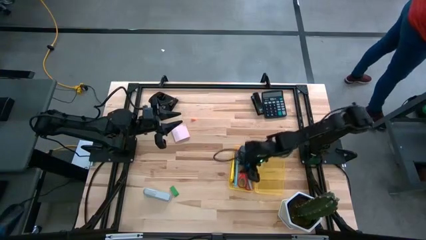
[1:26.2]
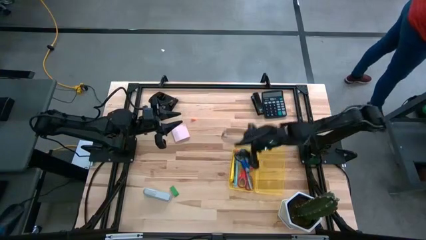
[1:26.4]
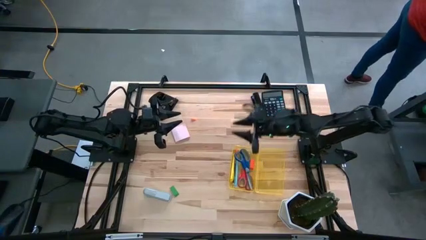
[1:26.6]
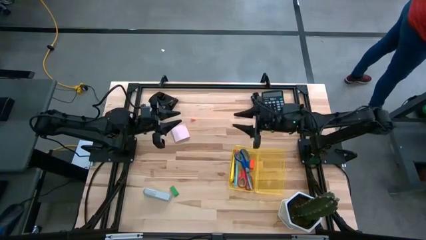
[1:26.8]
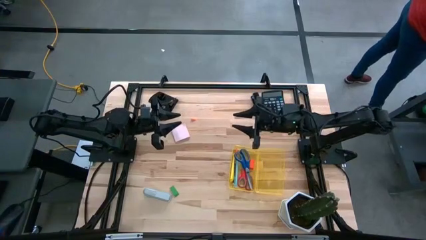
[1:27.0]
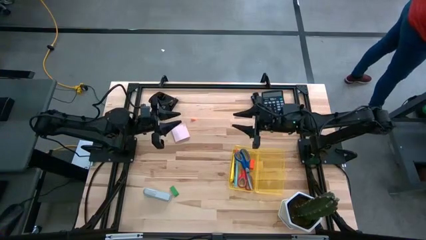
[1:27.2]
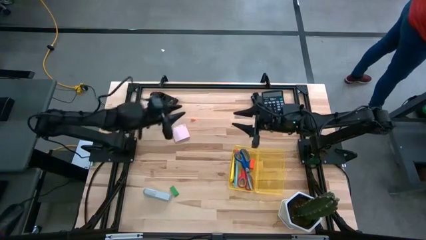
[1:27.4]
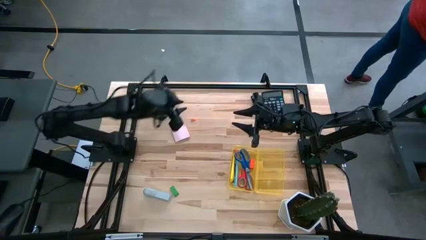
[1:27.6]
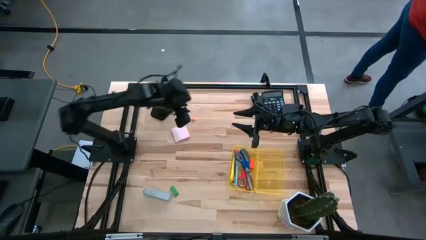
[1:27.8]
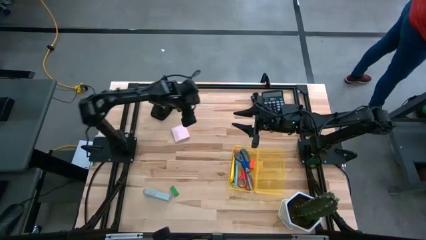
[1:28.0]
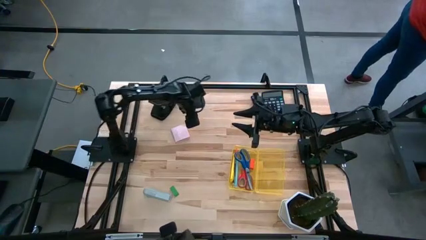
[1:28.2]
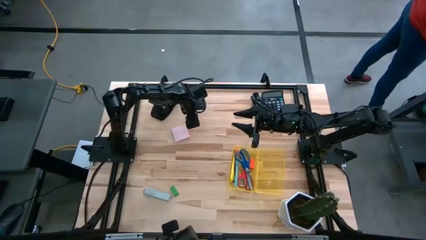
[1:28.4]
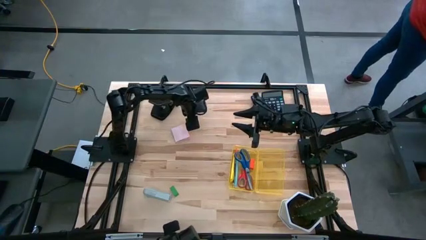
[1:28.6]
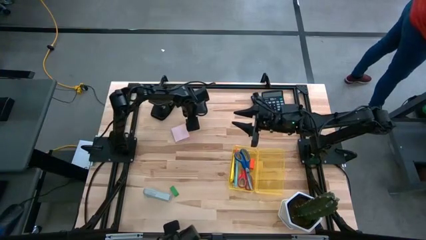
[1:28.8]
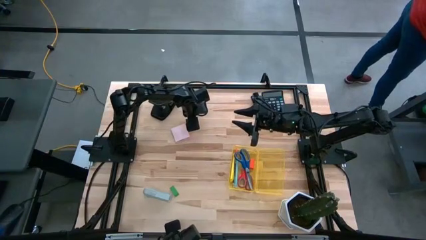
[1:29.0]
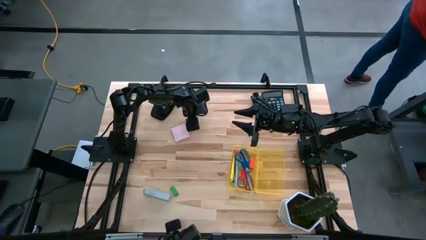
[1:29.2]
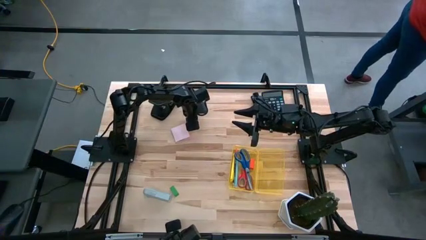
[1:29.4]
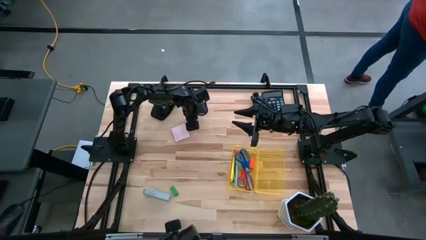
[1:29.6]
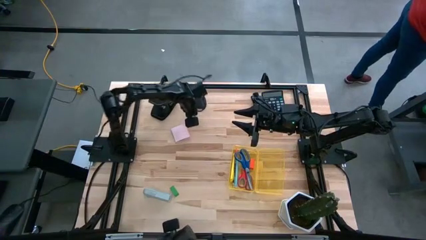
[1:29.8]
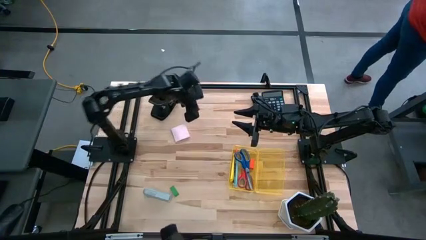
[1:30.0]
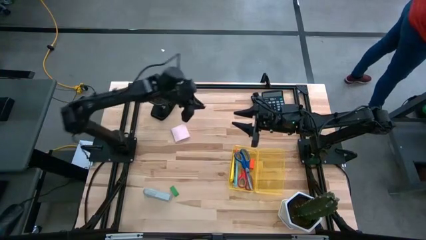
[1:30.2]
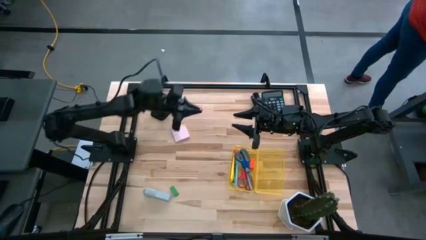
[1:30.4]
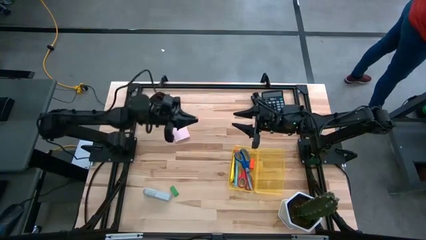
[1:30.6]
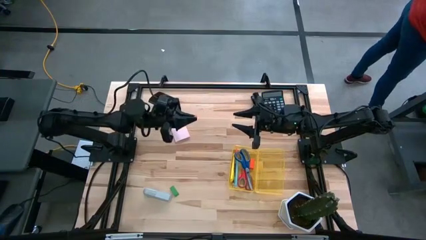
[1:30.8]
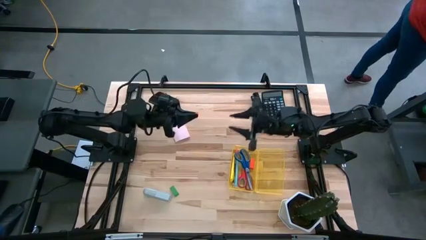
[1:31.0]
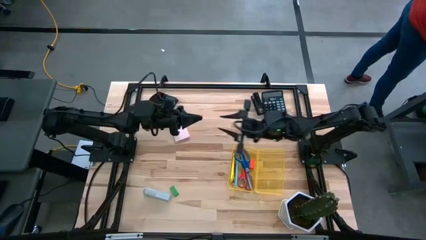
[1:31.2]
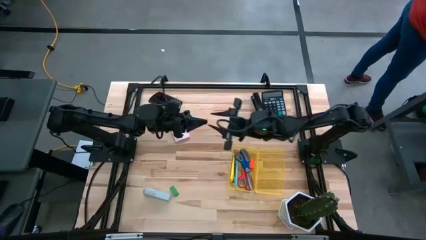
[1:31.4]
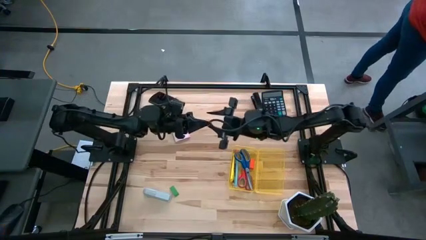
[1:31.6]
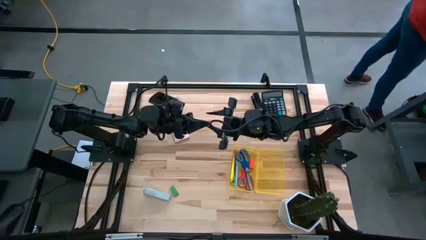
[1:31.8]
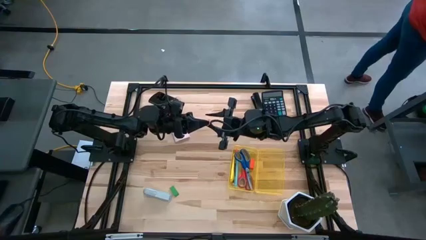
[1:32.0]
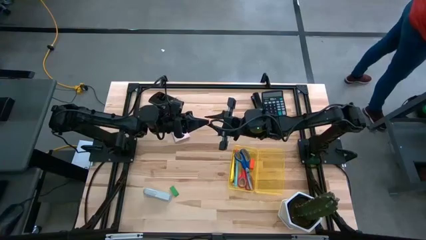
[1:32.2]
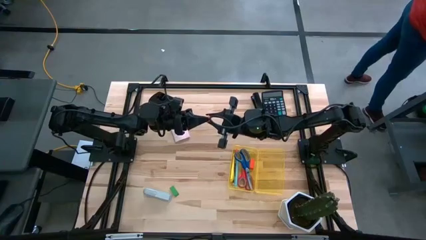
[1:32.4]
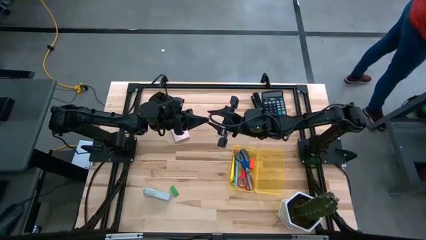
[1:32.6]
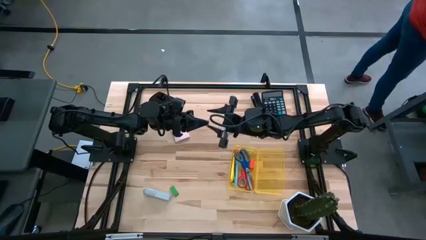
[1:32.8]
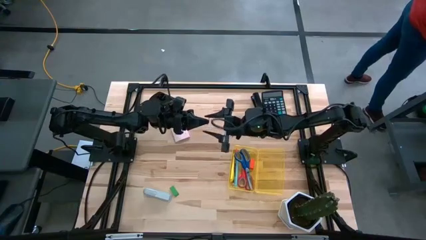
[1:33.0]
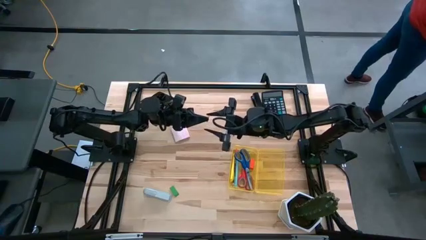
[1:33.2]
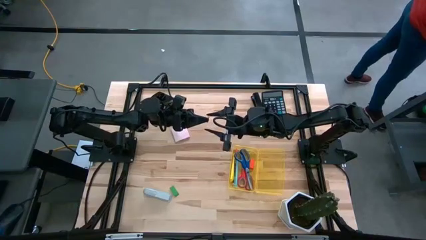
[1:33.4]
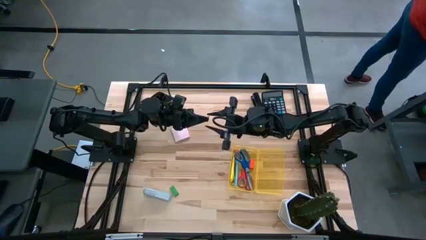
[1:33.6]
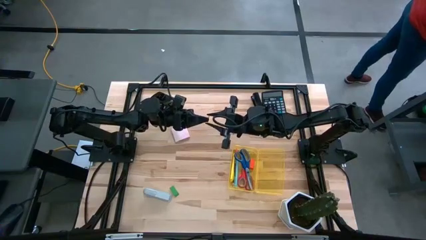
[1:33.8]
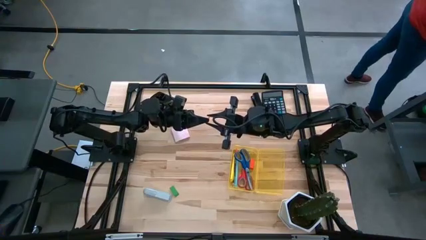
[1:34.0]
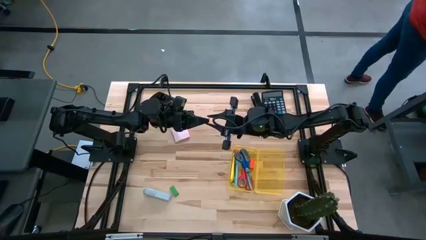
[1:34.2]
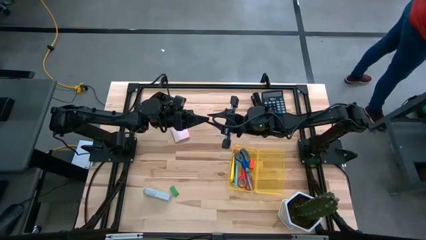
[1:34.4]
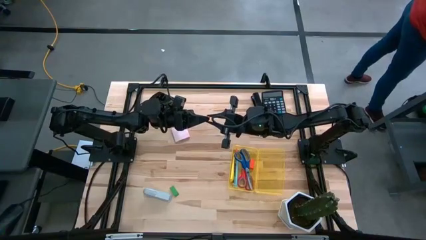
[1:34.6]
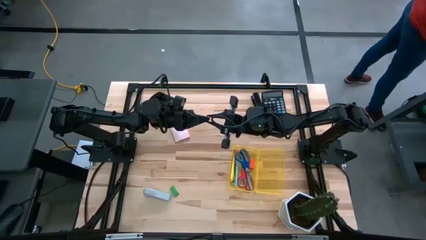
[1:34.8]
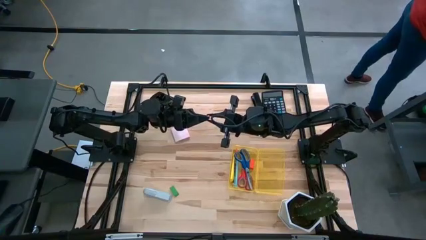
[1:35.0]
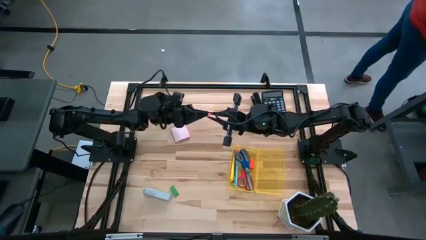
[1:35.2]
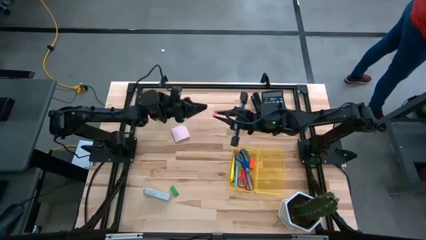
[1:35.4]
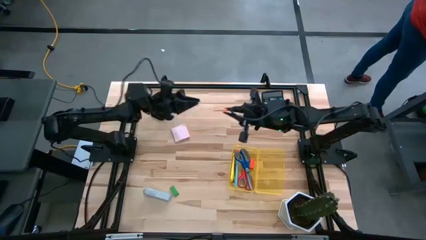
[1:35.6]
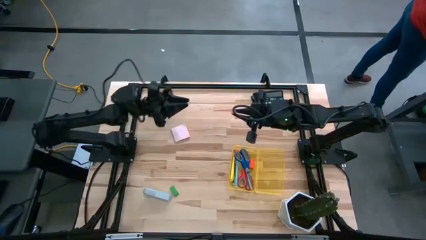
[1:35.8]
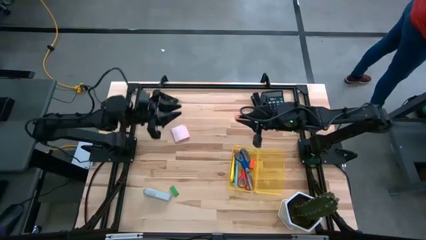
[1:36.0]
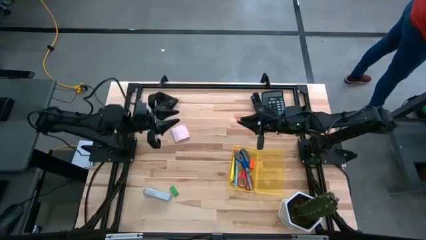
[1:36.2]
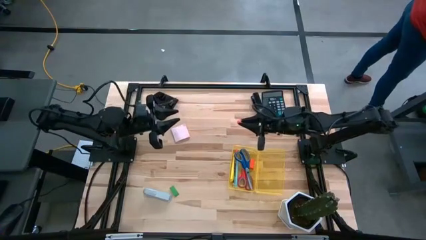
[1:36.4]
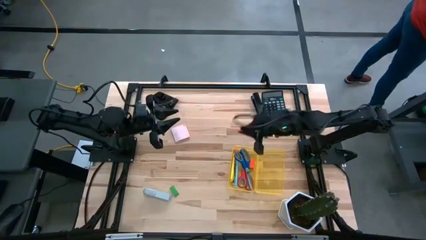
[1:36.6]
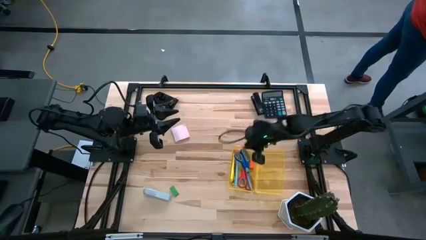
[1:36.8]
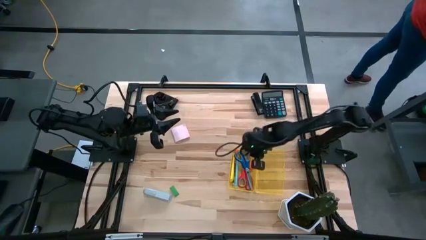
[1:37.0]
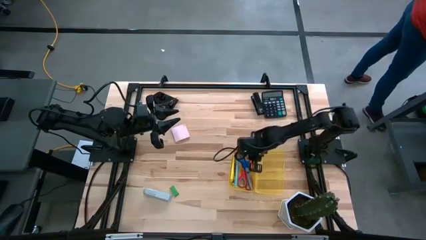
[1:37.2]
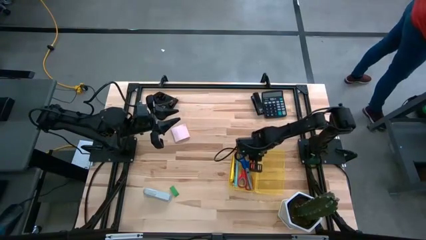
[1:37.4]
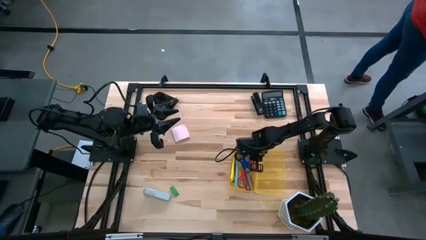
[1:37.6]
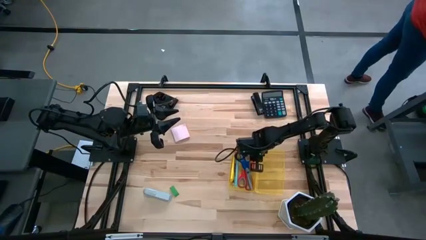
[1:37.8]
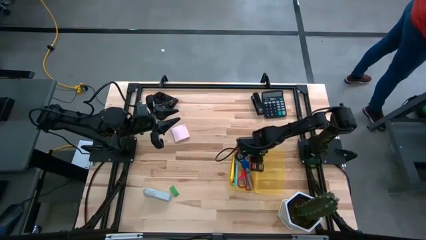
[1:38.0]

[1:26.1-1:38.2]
Task: Pack school essentials
Put the small orange eraser into the supply box

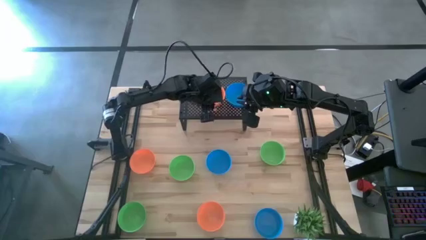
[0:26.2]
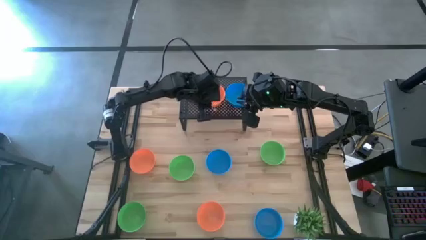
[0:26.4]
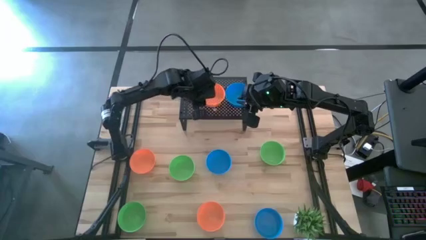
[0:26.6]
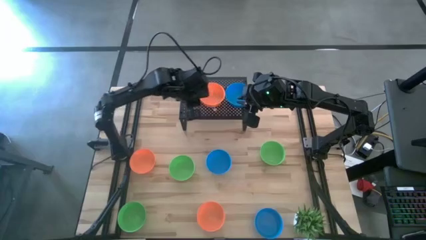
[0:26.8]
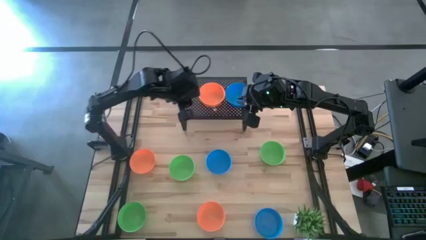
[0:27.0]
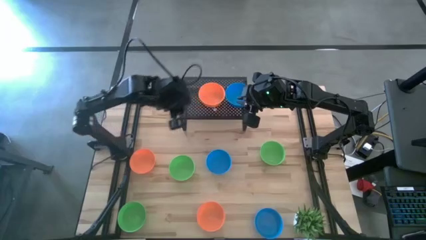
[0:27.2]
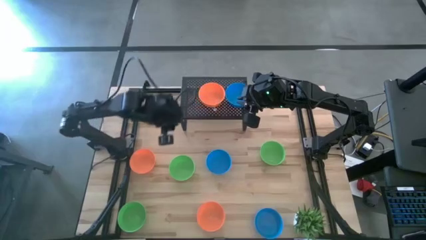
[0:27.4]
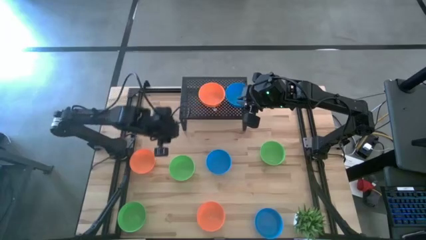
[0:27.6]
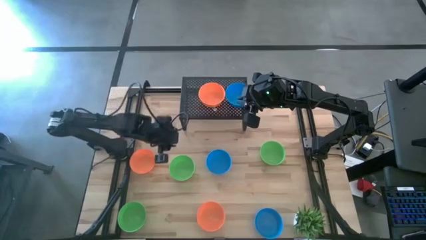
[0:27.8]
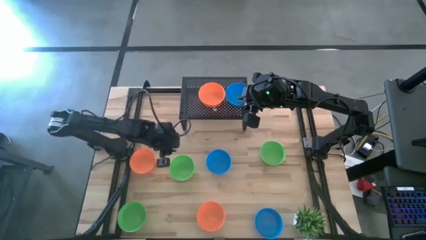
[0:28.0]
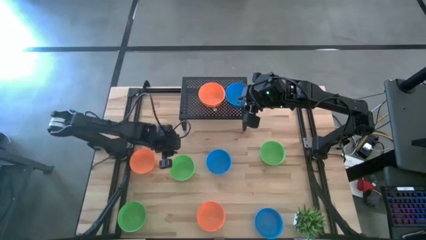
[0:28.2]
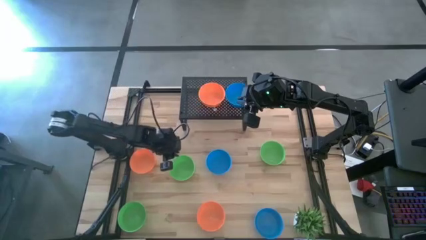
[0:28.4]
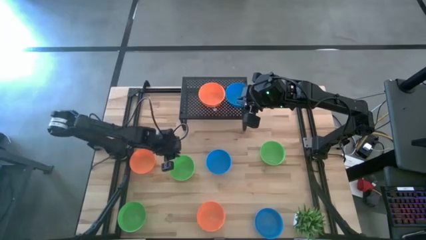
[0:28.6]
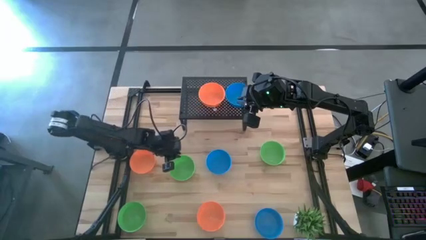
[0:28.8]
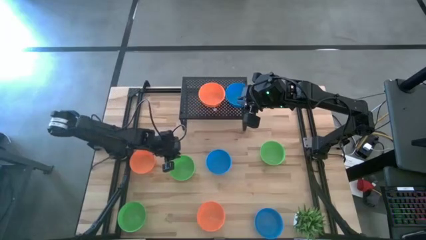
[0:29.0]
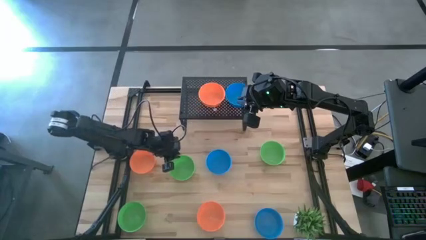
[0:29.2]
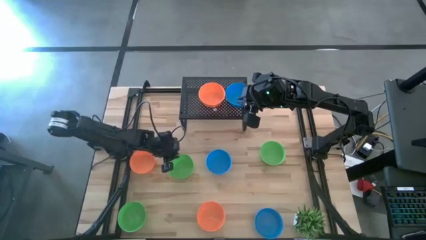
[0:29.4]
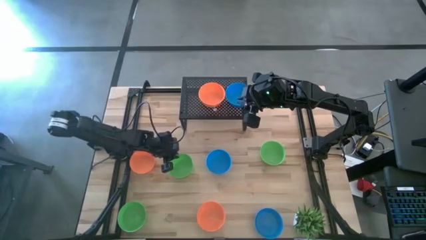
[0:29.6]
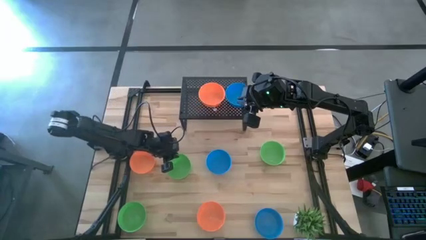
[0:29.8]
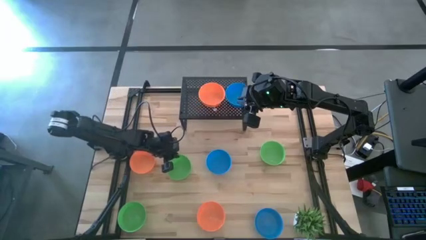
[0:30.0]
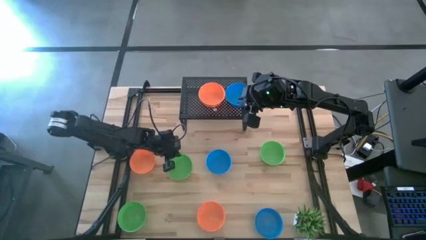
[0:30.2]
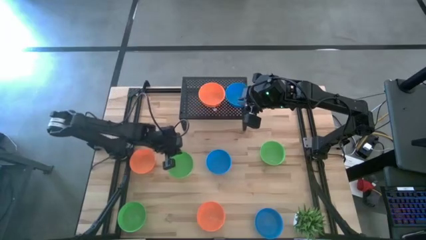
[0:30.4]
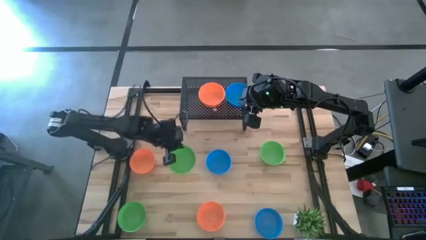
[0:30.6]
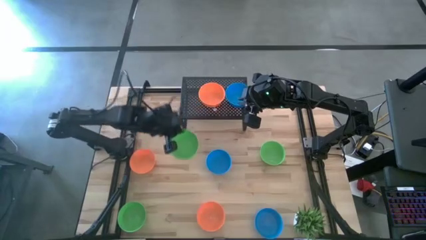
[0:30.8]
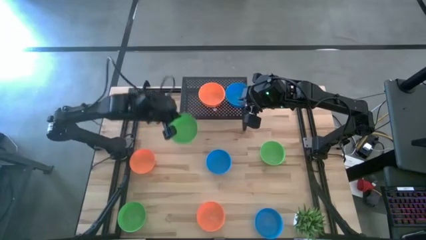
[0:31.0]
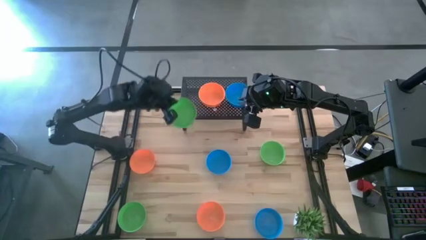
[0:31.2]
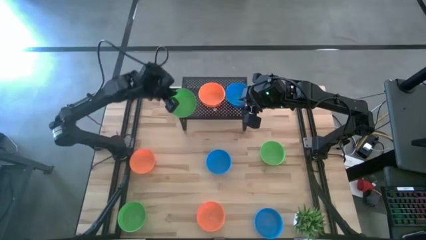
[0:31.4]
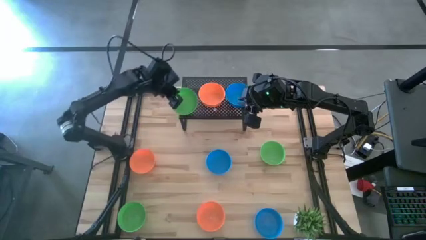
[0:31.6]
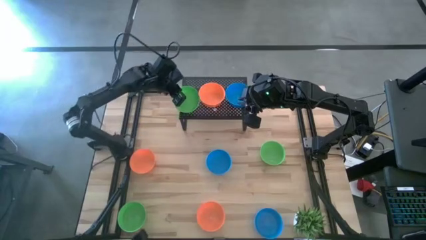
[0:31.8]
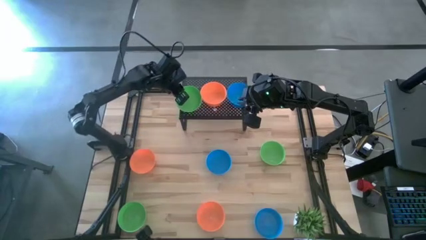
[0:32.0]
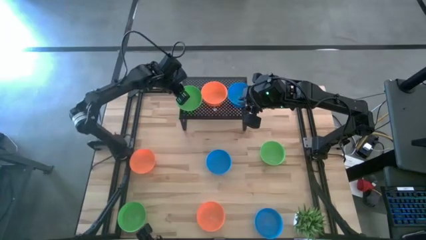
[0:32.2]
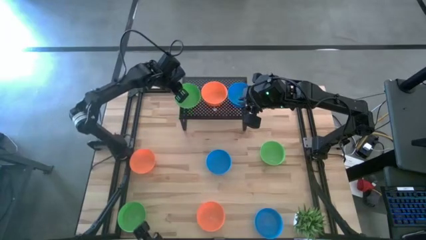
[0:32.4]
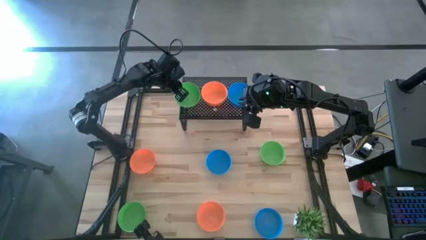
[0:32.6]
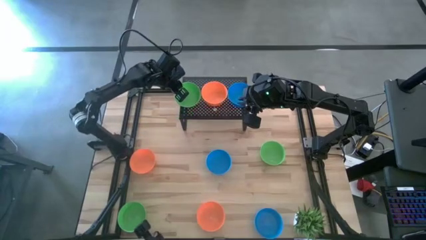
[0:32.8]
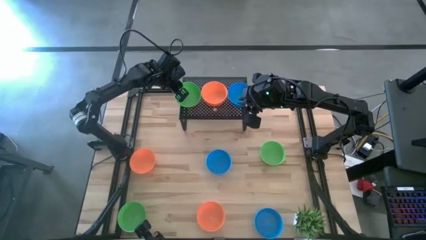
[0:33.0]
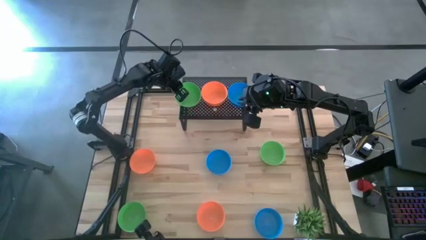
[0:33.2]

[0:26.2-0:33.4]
Task: Pick & Place Mini bowls
Put the top left green bowl on the shelf
